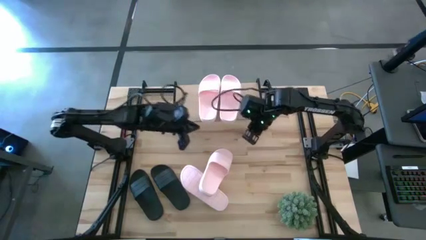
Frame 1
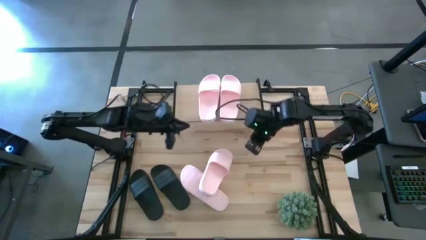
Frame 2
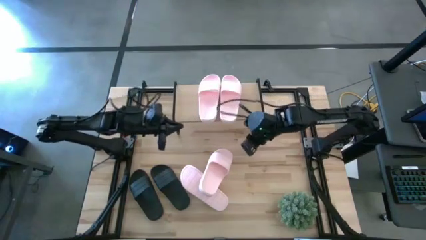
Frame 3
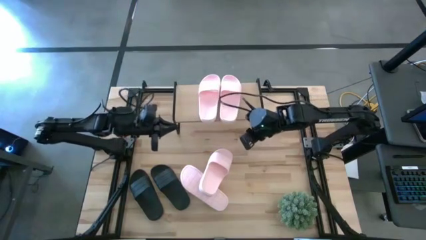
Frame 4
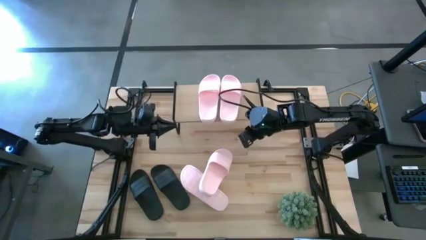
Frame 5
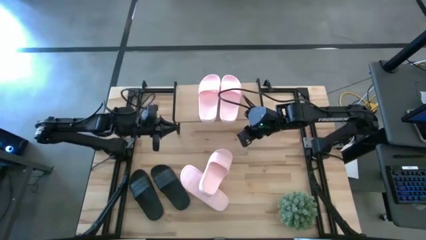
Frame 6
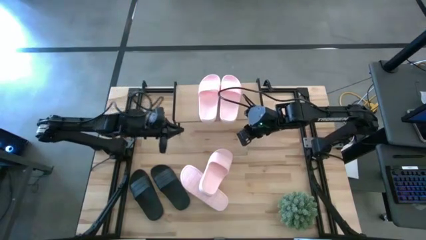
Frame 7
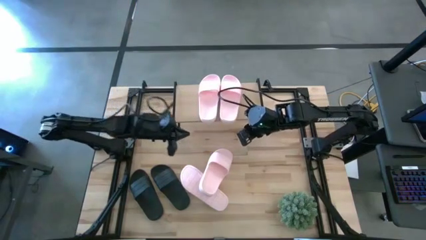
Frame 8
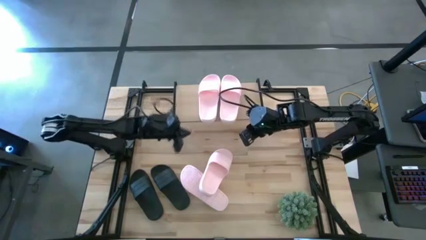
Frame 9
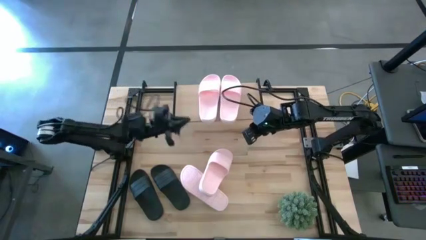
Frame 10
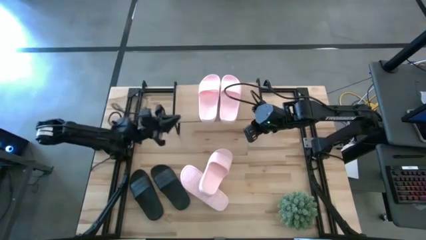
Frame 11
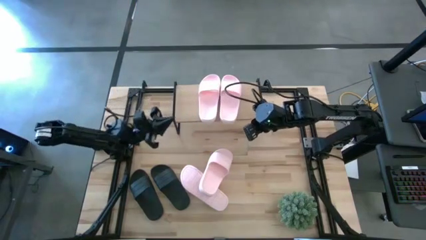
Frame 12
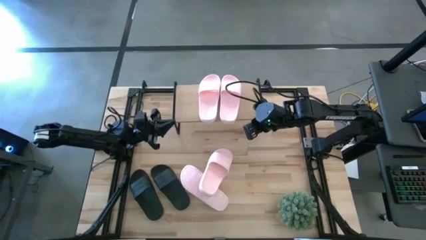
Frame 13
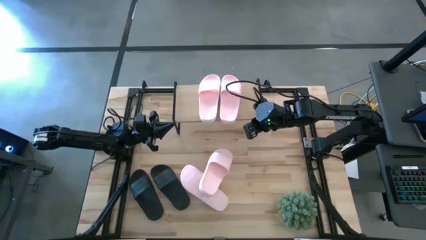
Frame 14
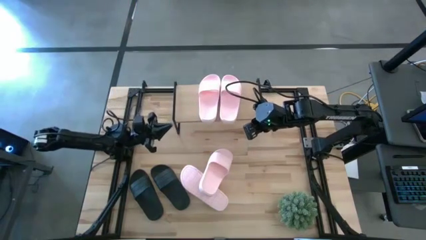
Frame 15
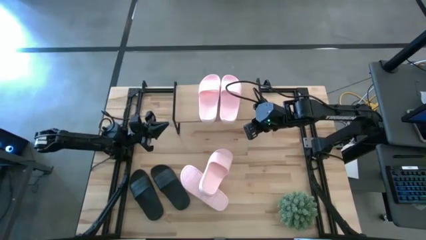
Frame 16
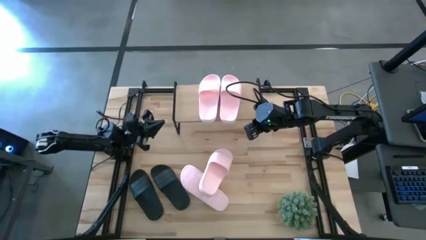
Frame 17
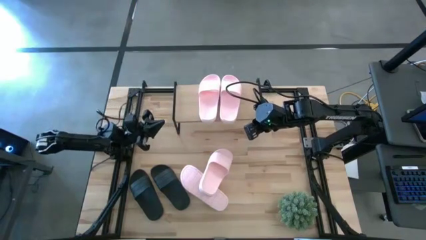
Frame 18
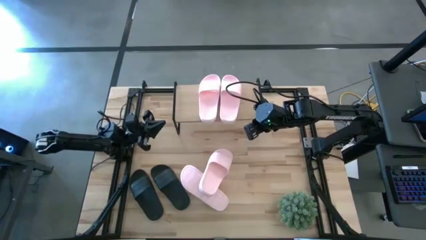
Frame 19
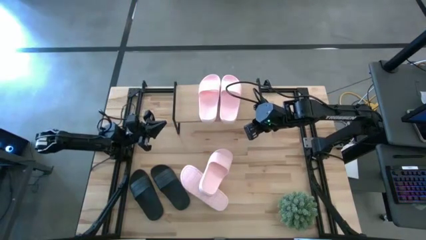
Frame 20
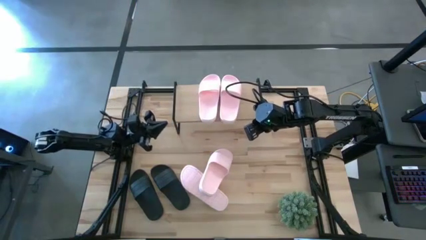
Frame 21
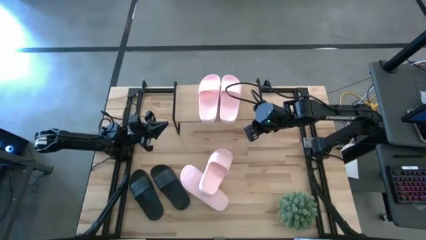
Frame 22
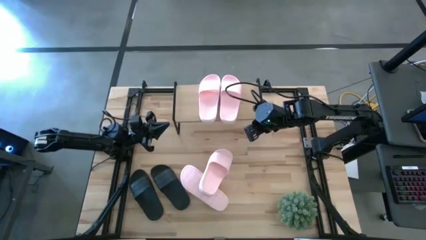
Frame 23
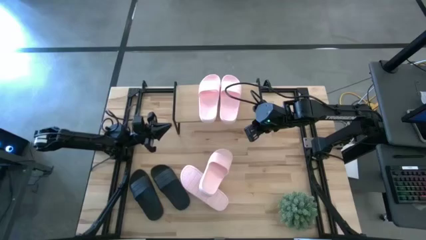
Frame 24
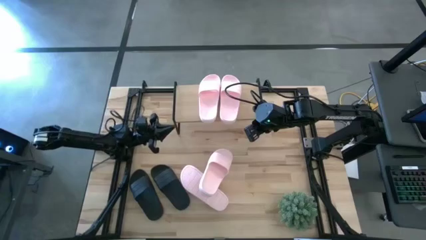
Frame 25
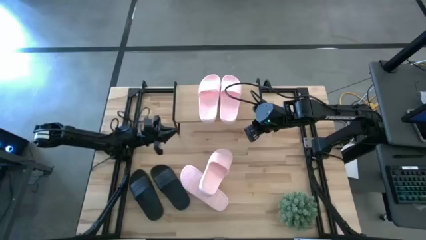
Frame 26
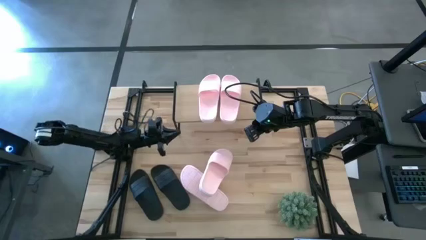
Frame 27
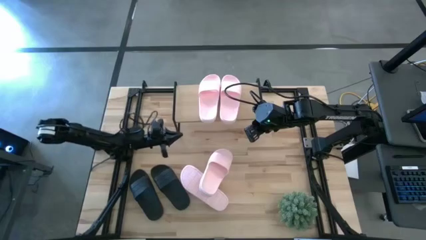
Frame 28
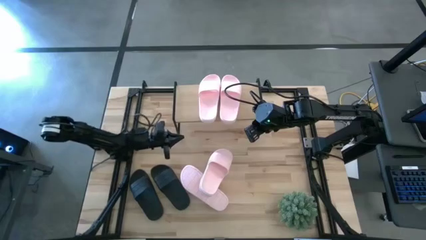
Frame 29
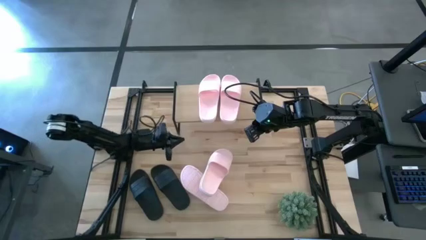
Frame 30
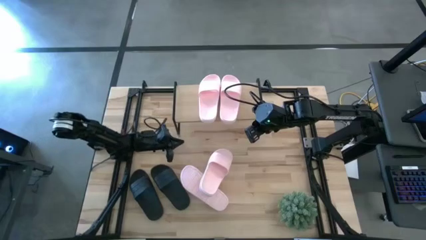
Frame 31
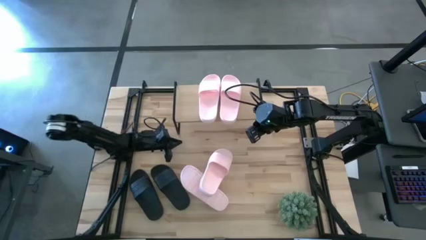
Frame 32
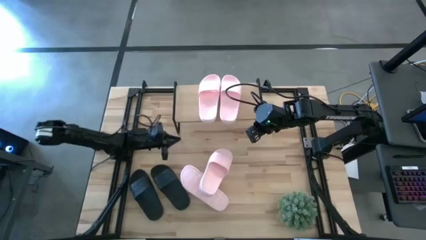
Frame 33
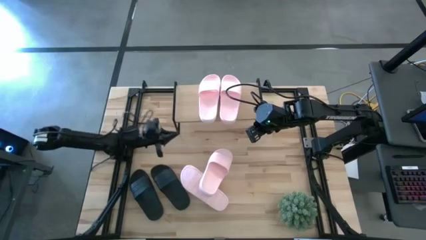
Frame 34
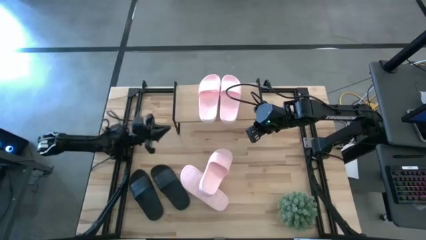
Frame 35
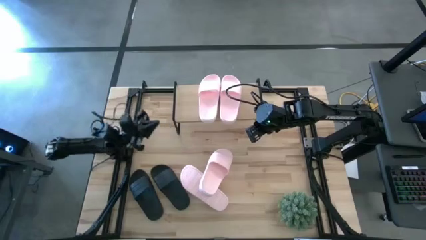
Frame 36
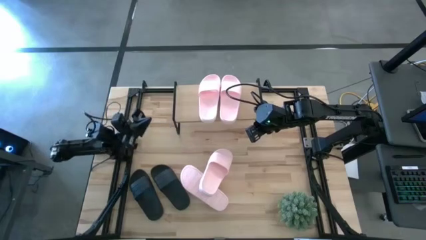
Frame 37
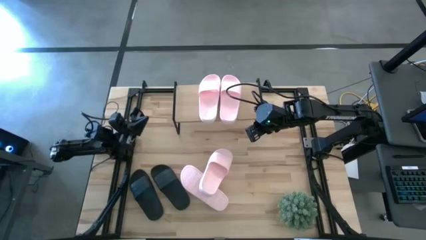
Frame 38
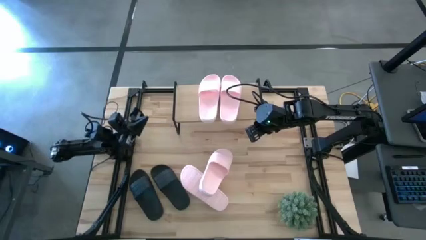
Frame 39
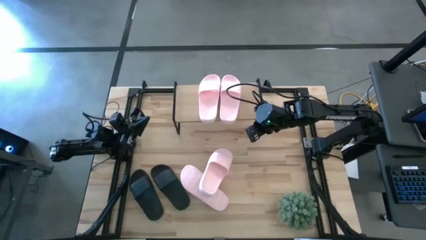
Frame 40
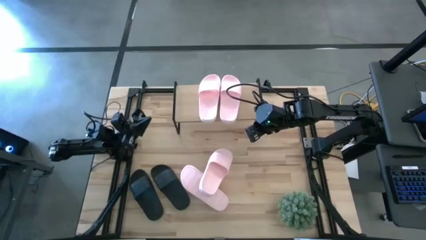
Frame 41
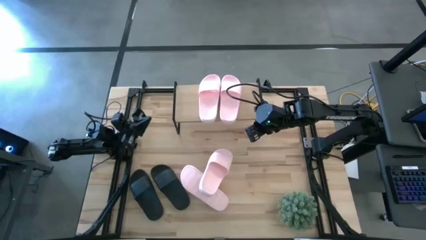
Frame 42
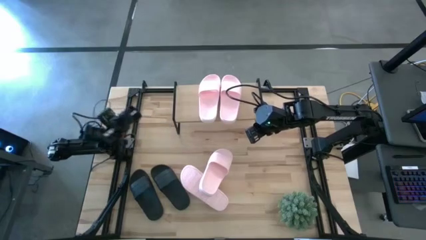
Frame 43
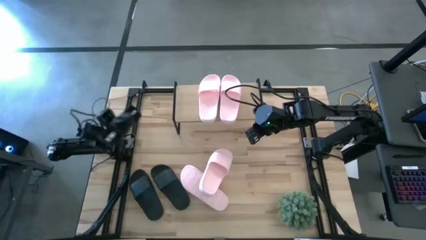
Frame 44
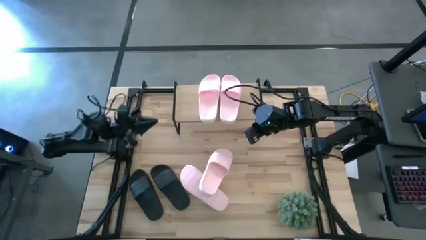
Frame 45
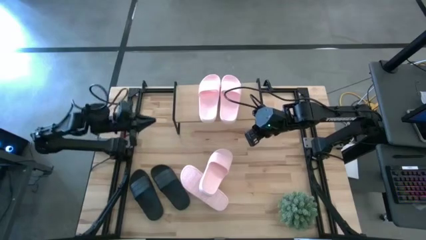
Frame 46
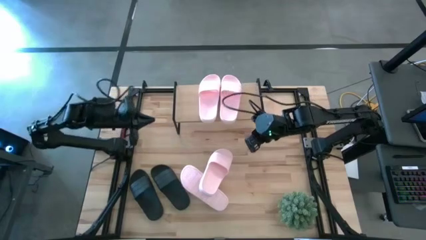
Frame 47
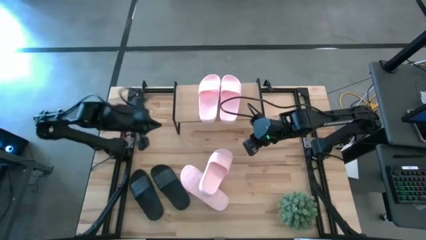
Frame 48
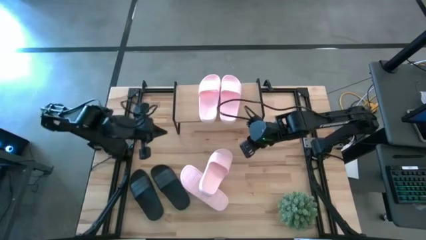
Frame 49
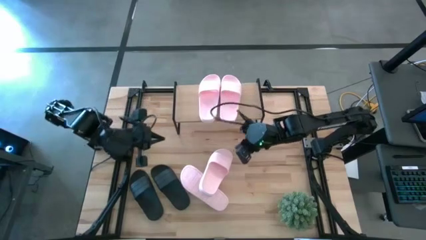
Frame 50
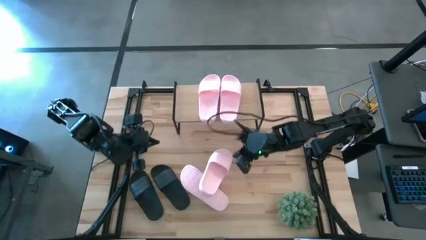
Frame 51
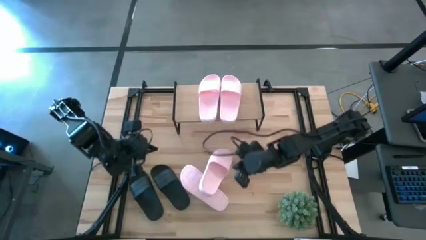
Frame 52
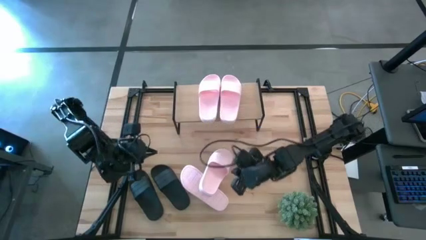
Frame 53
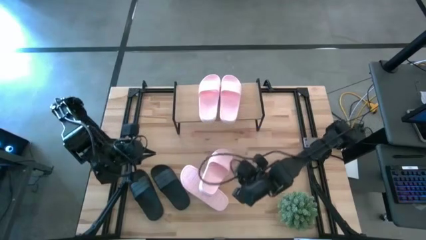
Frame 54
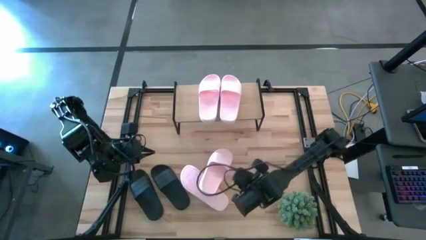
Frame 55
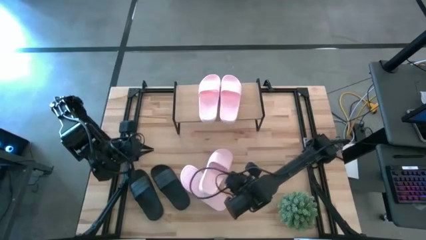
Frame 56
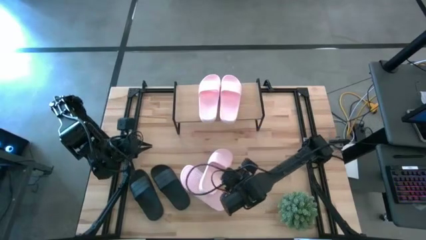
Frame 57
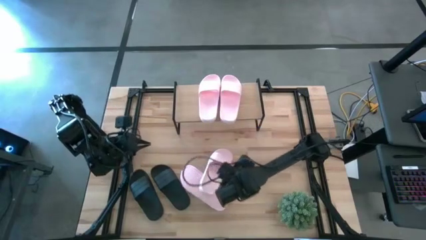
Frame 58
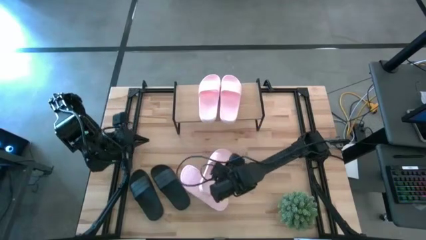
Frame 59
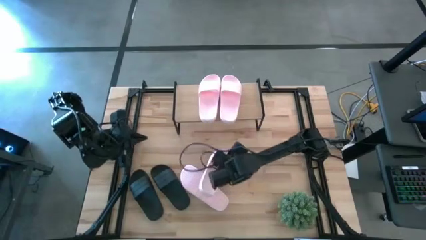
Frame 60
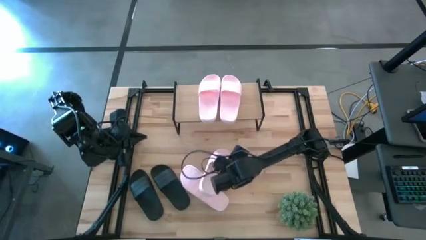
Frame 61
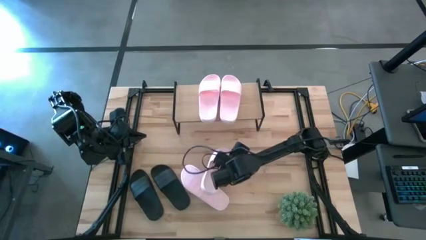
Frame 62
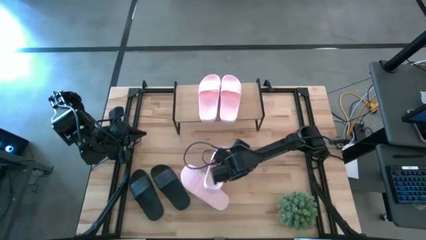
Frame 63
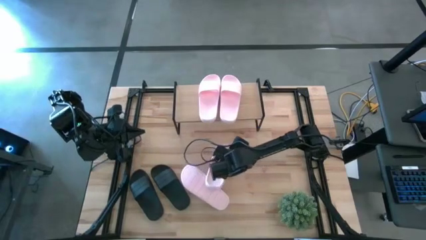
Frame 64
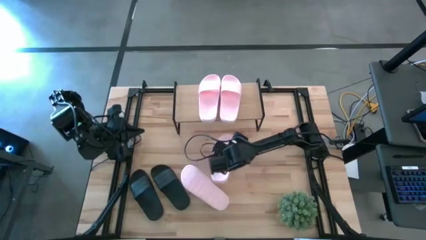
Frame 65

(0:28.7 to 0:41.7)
Task: Pick and place slides into the shelf
Put the pink slide under the shelf
